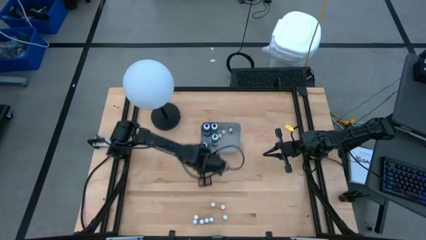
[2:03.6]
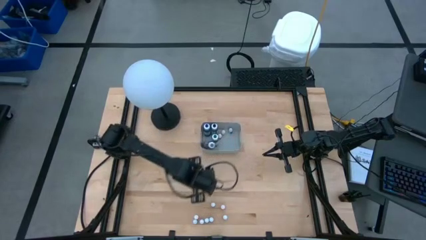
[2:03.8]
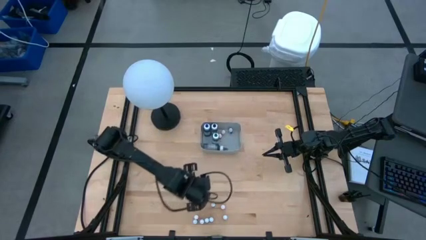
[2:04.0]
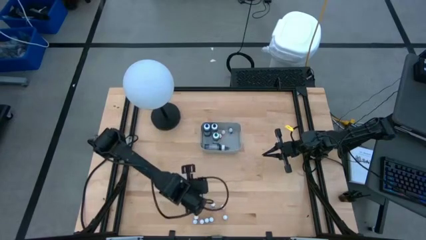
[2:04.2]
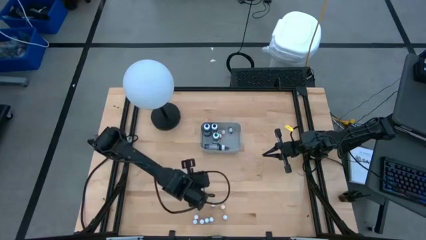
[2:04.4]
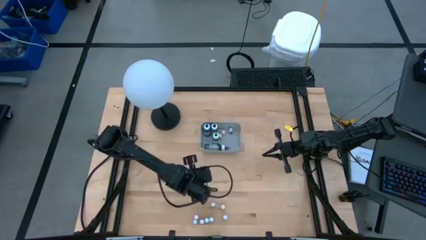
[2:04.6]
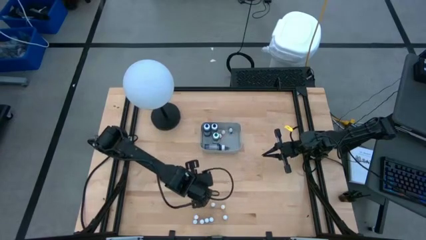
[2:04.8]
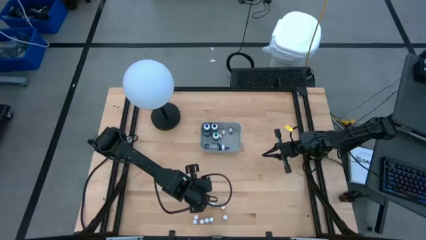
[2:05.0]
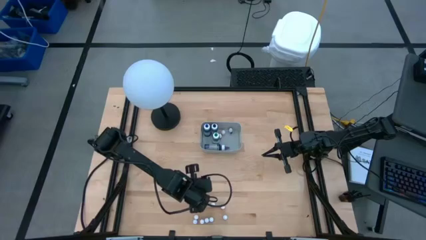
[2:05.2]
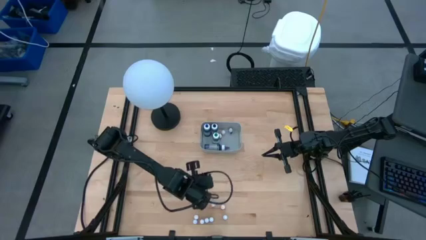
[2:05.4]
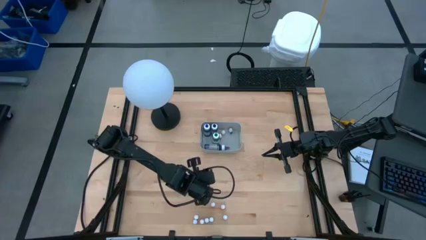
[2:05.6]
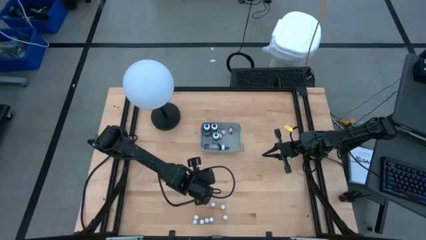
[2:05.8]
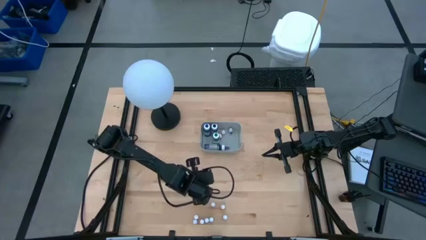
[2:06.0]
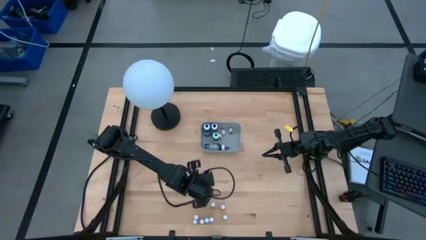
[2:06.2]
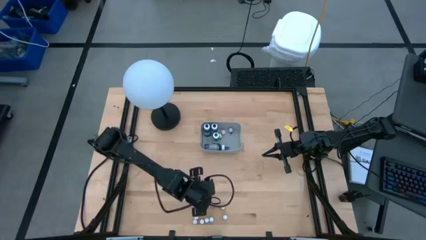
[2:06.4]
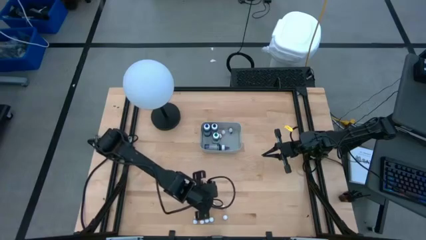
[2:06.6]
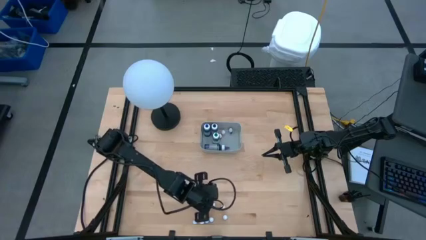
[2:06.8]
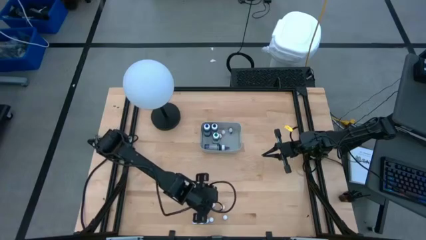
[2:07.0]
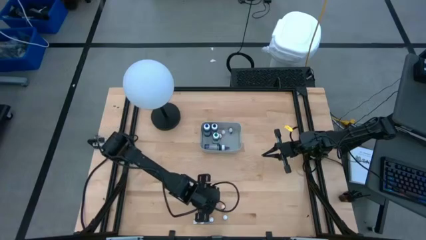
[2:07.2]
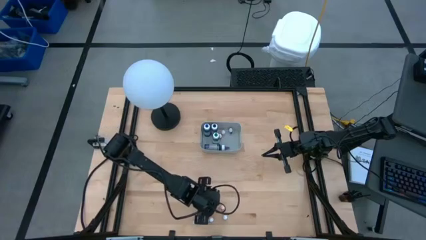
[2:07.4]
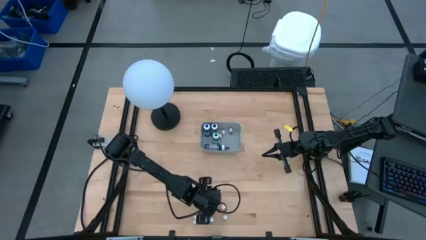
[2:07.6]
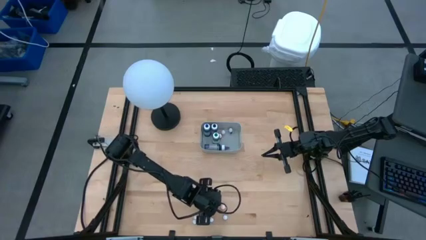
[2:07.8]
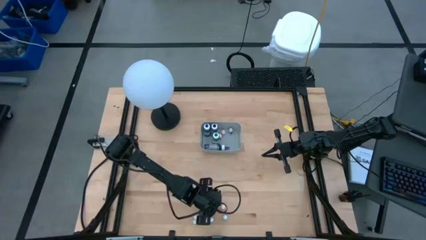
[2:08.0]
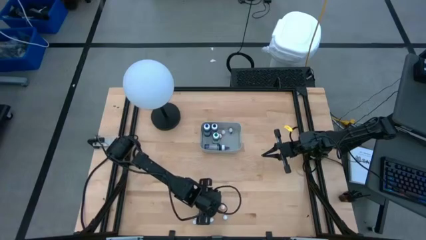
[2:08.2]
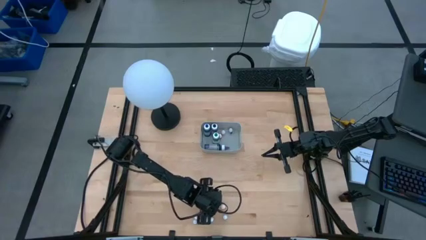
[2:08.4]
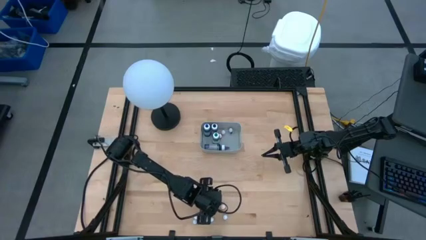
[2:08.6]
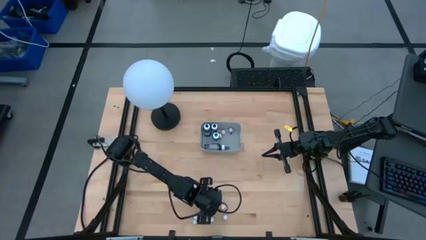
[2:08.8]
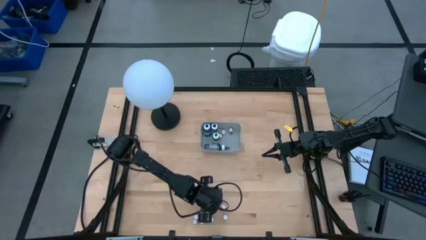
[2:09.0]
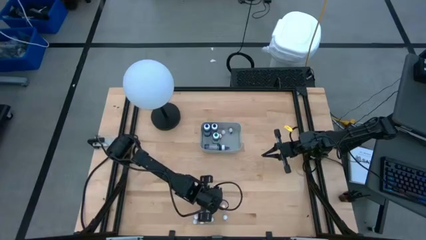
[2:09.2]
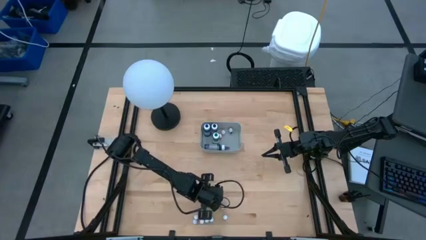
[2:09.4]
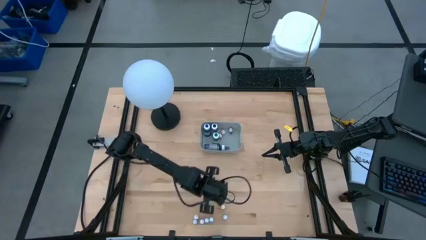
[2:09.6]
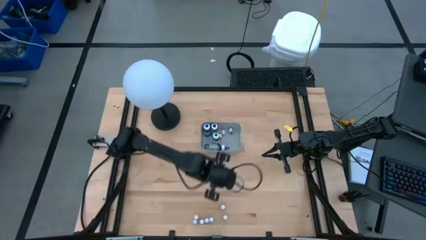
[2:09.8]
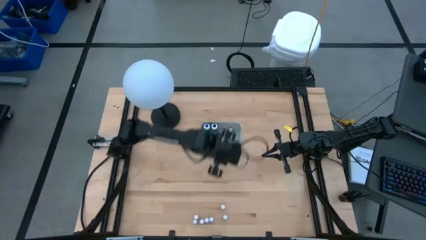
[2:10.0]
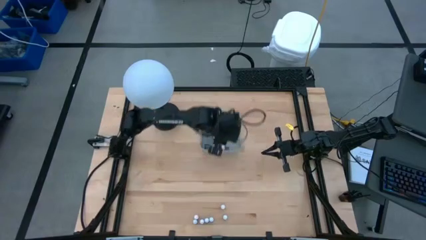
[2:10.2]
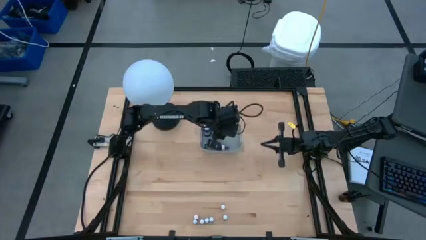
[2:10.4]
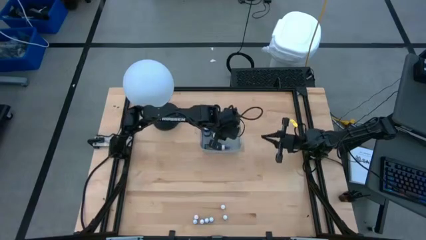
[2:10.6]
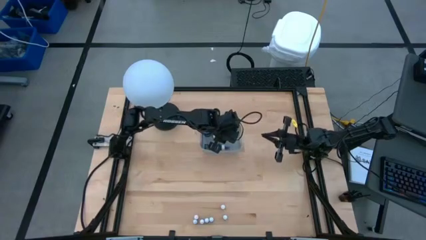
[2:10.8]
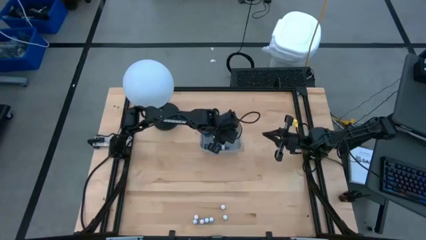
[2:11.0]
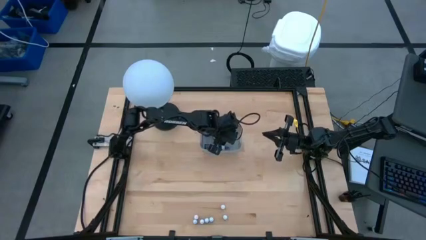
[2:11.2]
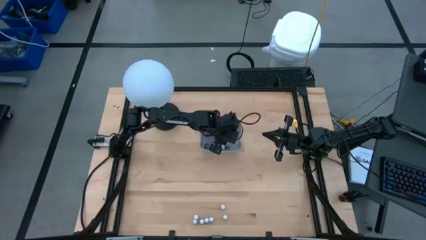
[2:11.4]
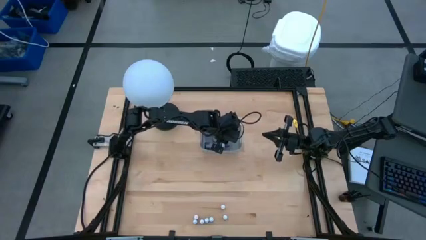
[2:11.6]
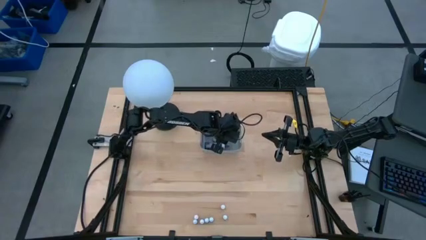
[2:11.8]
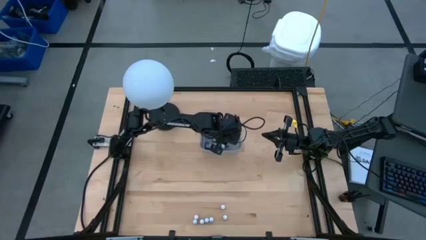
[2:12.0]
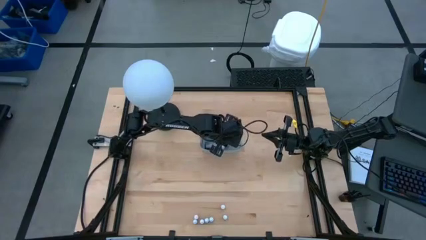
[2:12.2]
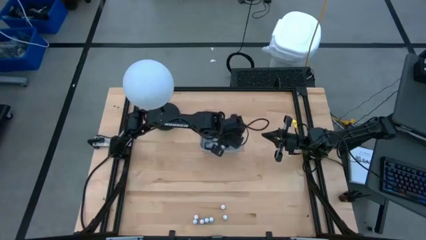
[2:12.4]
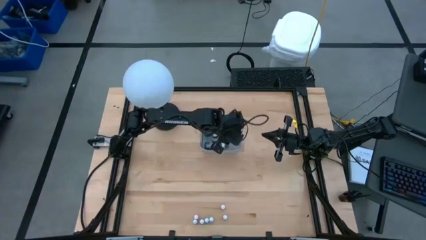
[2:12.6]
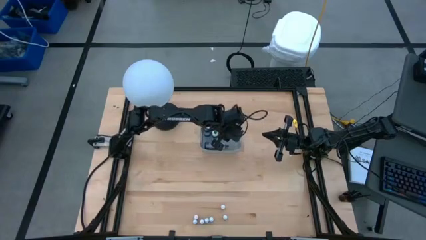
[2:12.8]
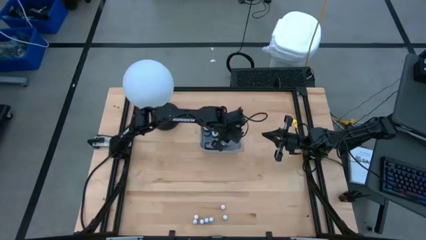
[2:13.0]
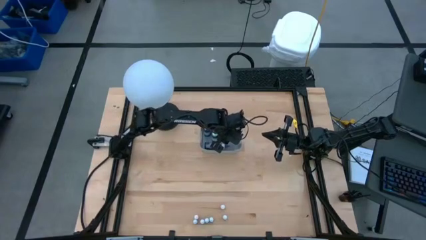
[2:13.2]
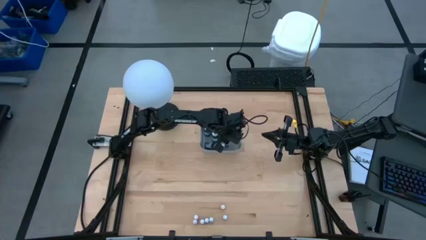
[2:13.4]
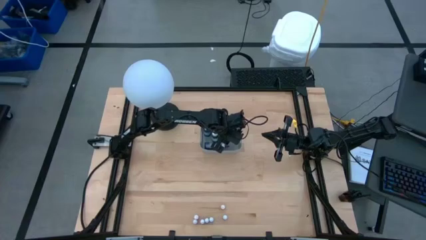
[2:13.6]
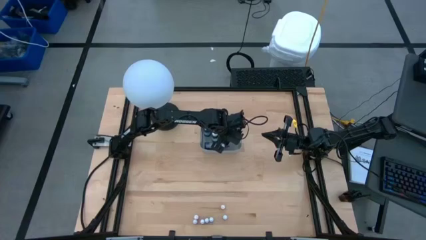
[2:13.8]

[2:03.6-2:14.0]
Task: Pick & Place food coloring
Put the small blue food coloring bottle into the gray bin

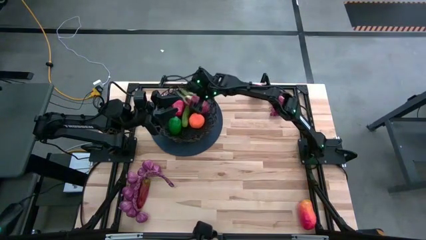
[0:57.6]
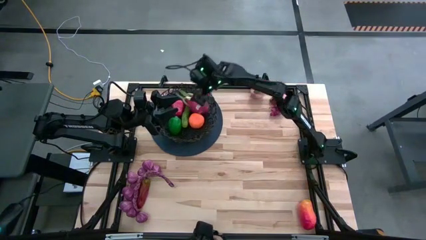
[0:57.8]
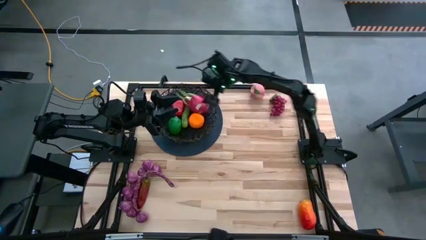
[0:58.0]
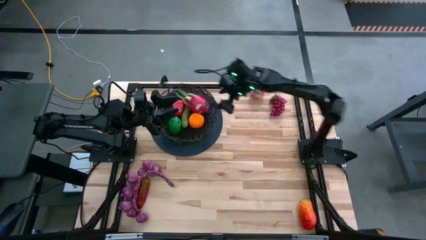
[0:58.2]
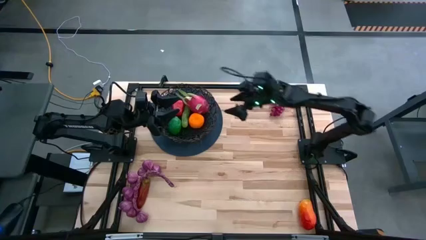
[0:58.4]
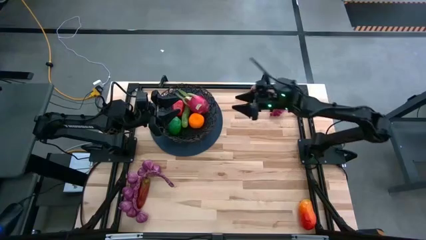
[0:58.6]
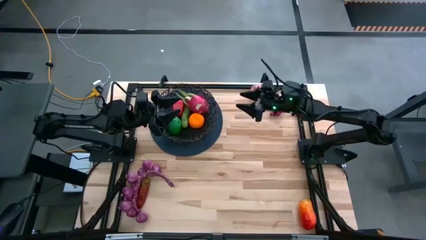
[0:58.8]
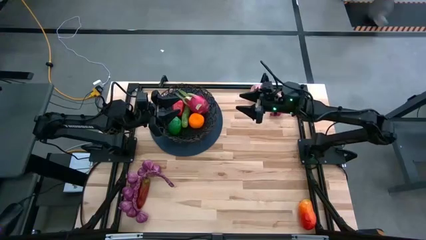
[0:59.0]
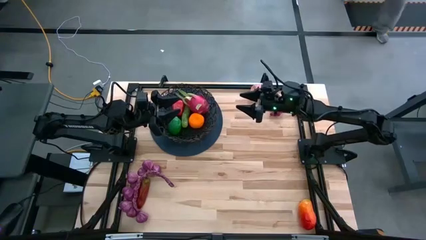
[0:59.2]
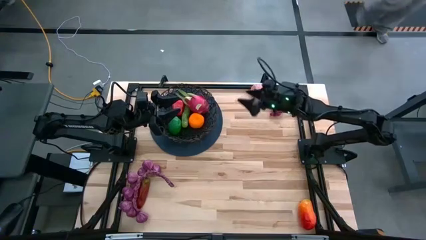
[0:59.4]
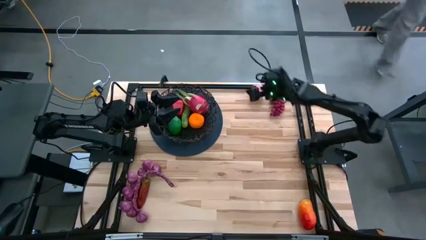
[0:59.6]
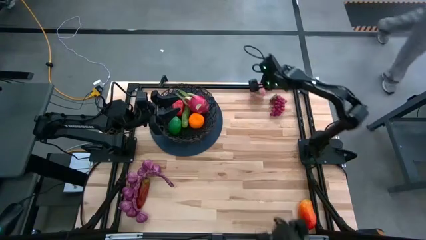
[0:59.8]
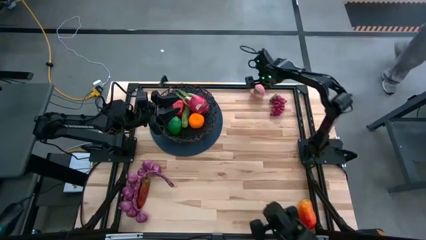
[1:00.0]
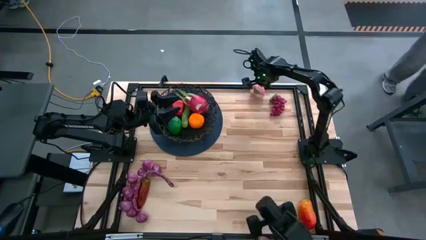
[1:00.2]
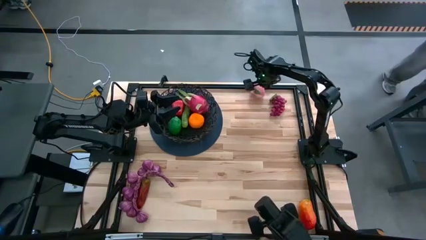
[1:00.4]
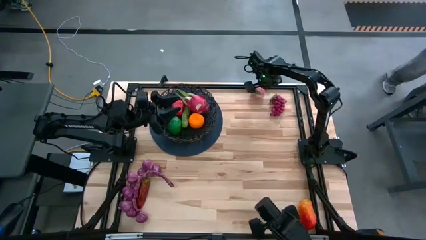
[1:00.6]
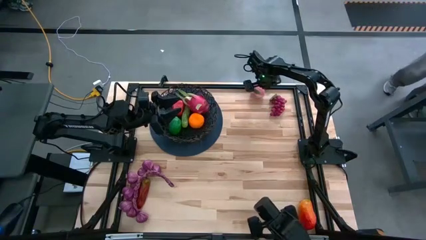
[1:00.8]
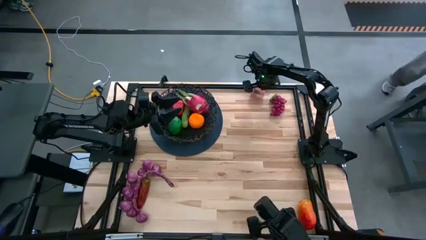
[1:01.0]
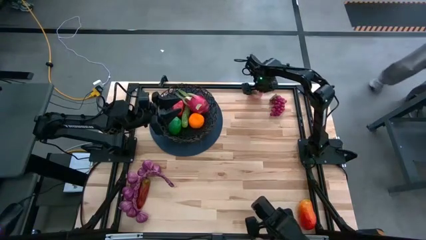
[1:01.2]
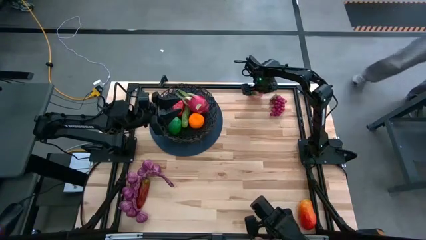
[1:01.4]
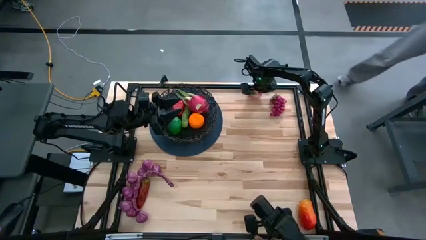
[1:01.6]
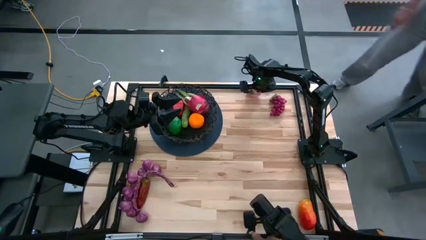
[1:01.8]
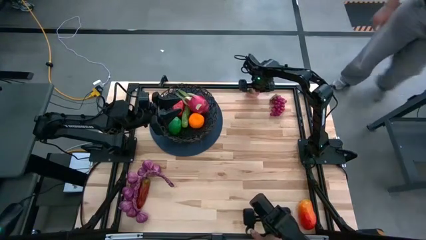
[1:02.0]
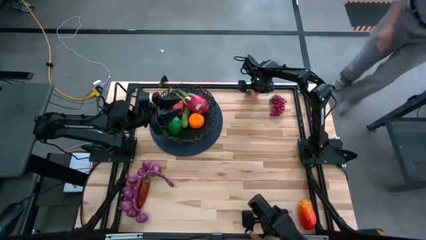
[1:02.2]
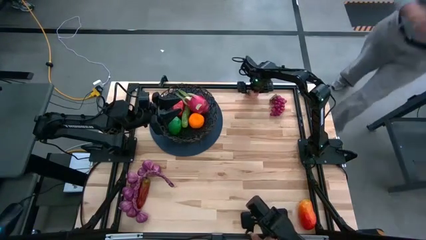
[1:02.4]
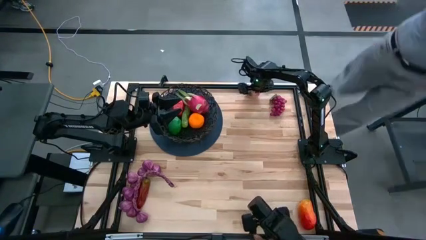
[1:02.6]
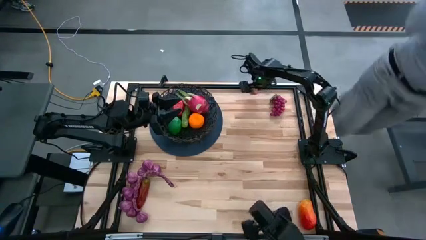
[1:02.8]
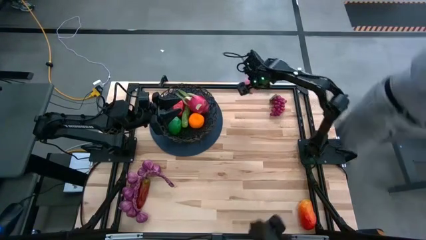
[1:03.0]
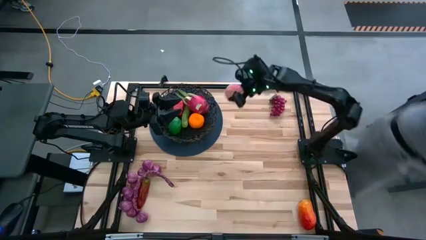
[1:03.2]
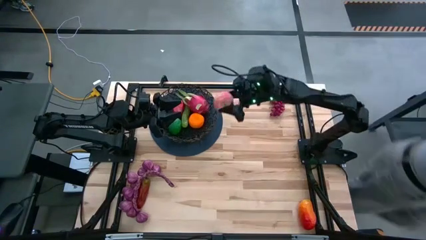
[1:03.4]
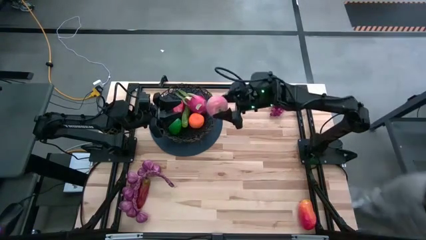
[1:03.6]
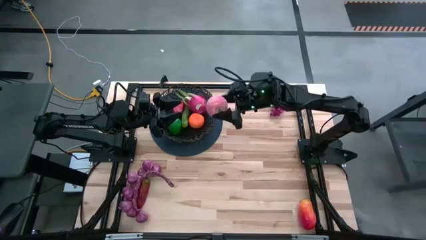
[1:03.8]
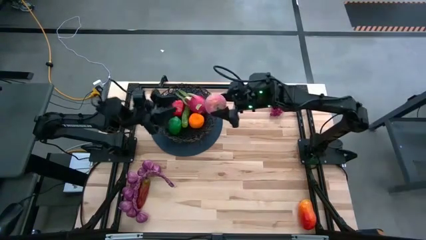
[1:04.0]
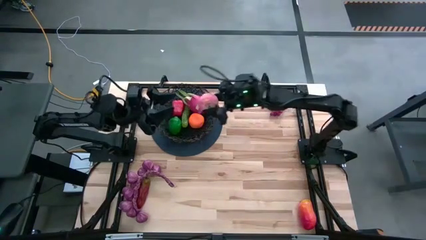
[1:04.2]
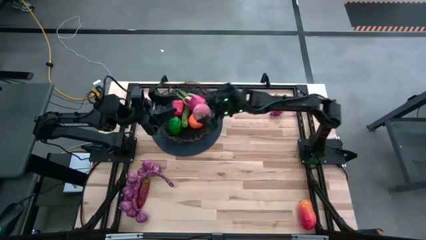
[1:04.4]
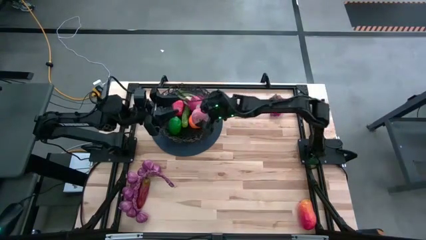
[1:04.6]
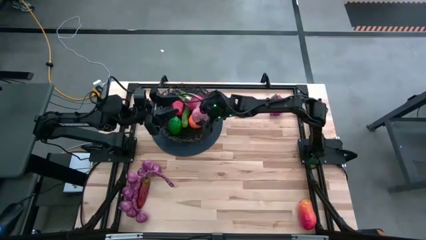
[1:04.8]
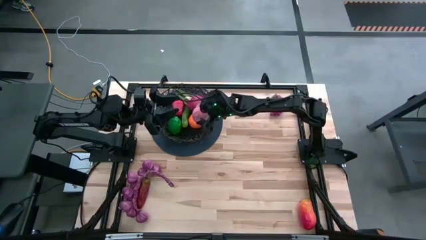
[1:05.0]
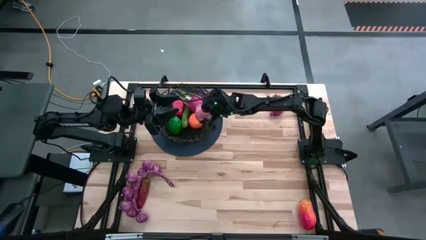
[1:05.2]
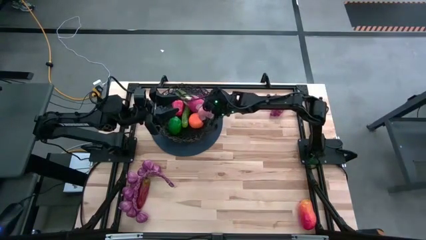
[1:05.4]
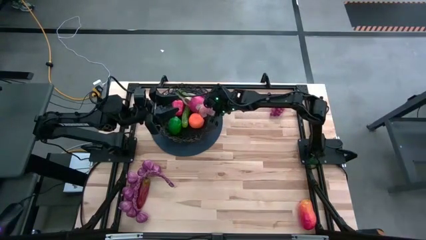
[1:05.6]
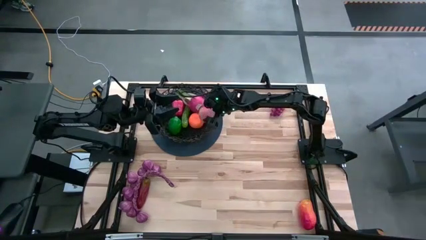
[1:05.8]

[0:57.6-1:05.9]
Task: Build produce basket
Put the pink peach into the black wire basket
